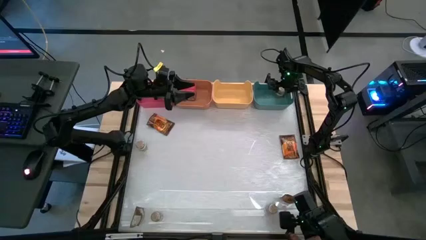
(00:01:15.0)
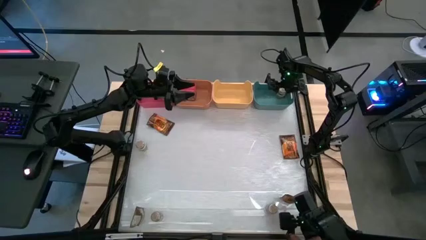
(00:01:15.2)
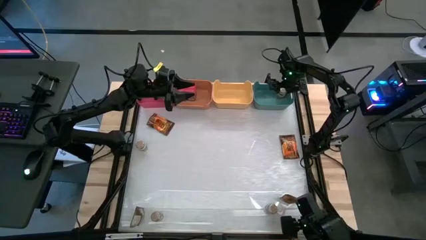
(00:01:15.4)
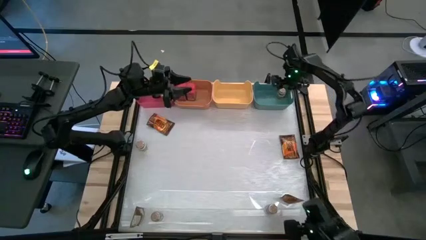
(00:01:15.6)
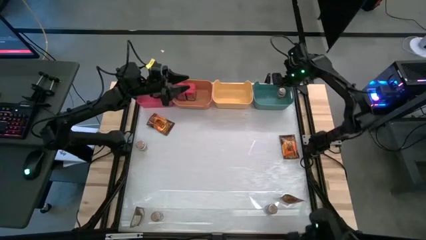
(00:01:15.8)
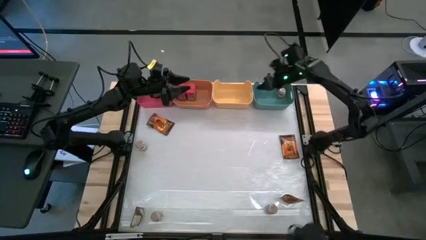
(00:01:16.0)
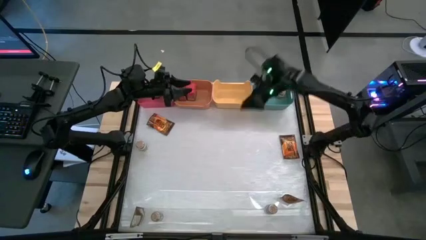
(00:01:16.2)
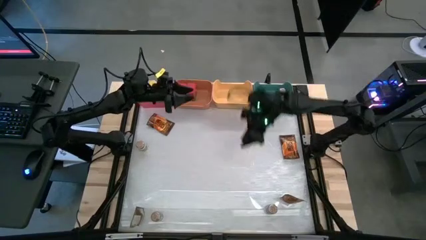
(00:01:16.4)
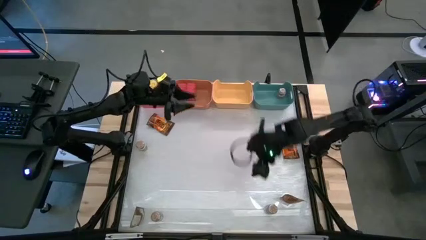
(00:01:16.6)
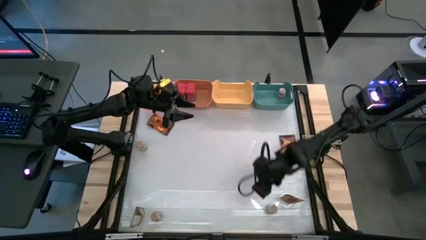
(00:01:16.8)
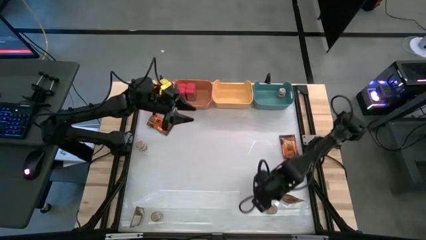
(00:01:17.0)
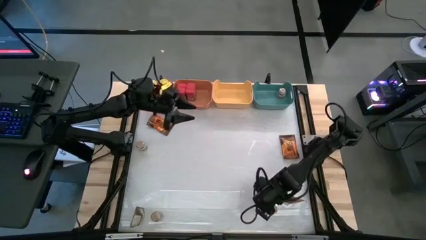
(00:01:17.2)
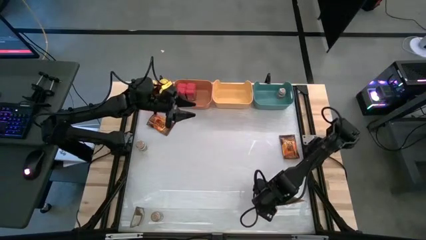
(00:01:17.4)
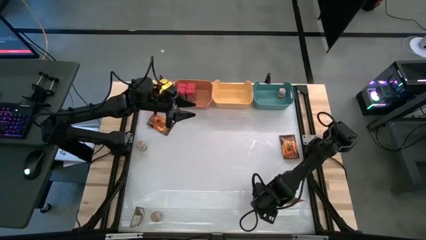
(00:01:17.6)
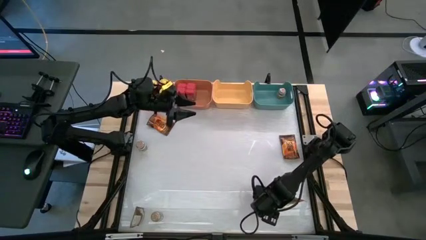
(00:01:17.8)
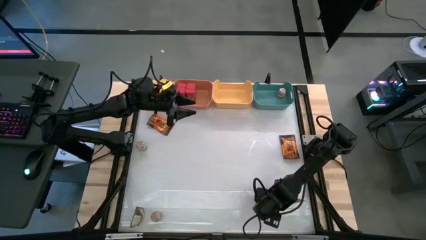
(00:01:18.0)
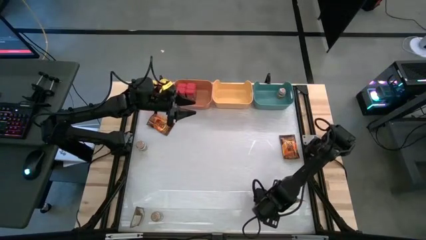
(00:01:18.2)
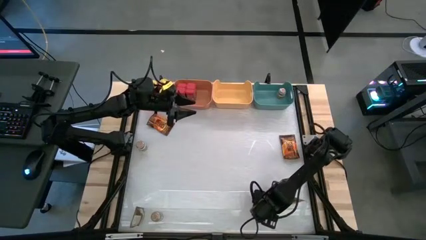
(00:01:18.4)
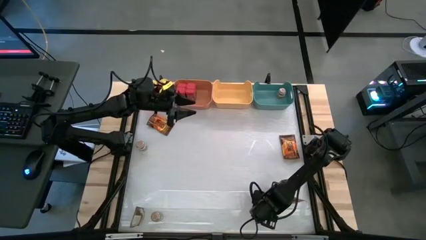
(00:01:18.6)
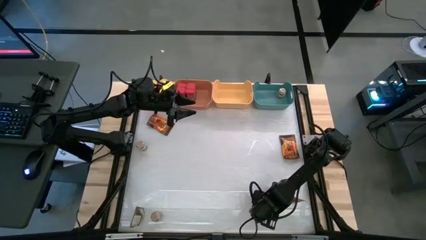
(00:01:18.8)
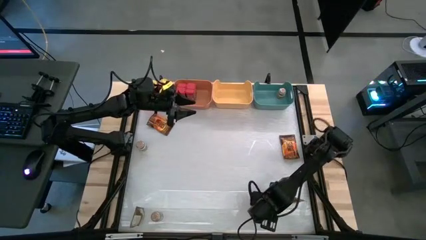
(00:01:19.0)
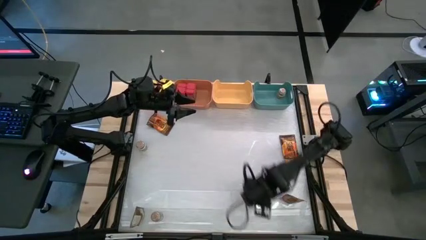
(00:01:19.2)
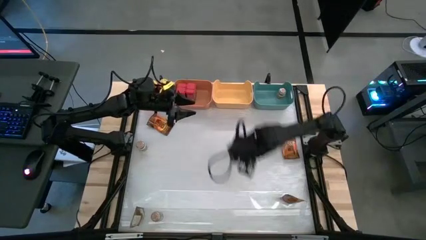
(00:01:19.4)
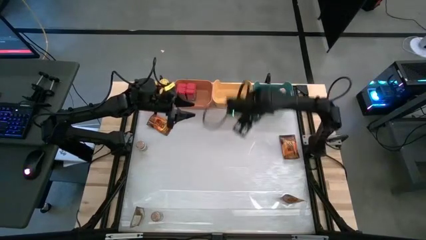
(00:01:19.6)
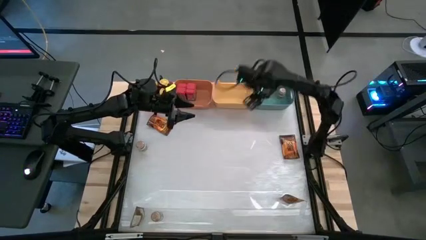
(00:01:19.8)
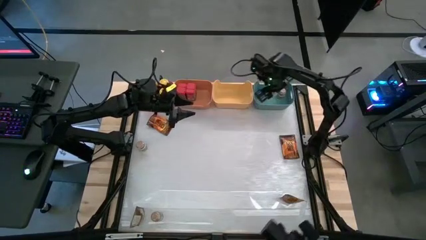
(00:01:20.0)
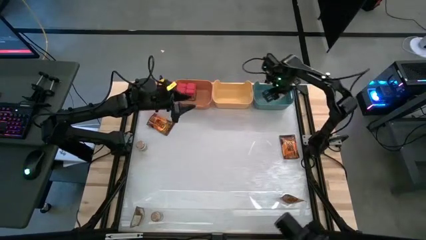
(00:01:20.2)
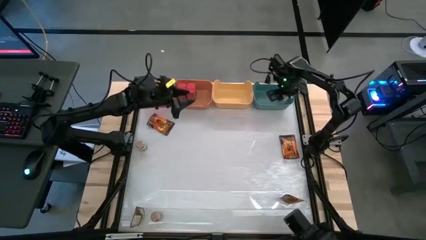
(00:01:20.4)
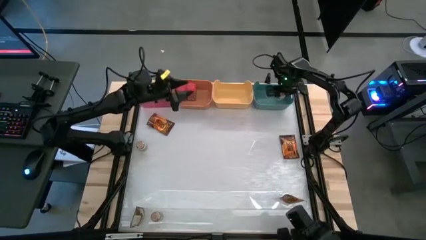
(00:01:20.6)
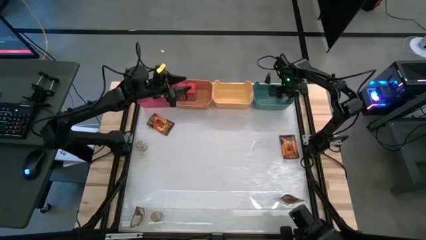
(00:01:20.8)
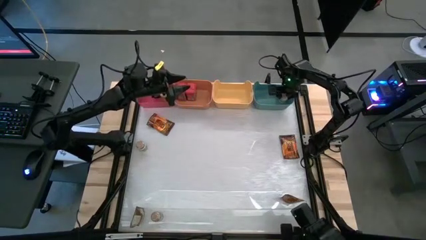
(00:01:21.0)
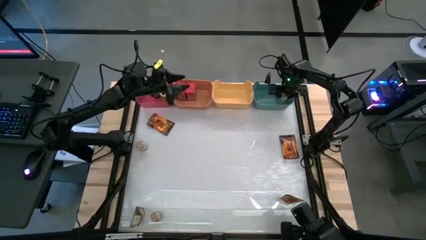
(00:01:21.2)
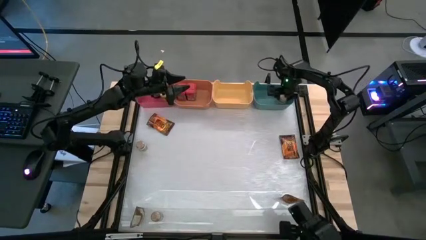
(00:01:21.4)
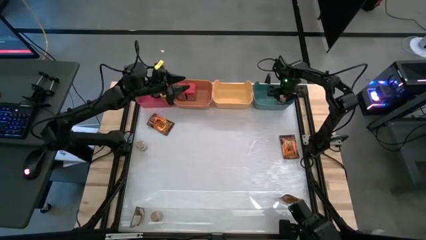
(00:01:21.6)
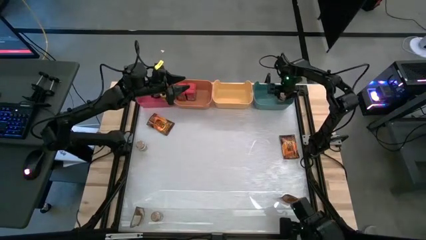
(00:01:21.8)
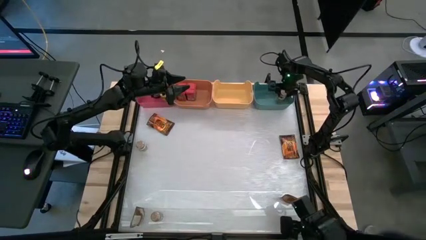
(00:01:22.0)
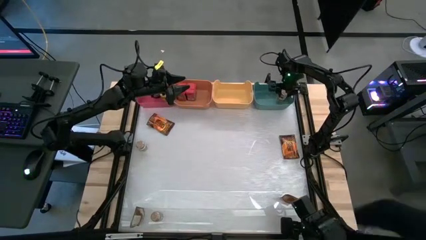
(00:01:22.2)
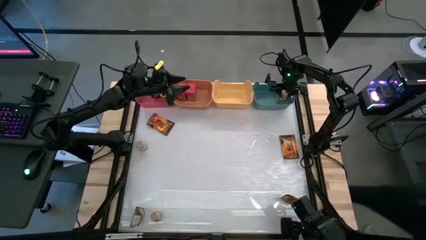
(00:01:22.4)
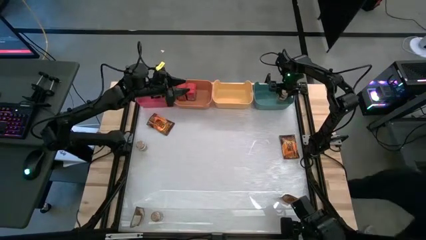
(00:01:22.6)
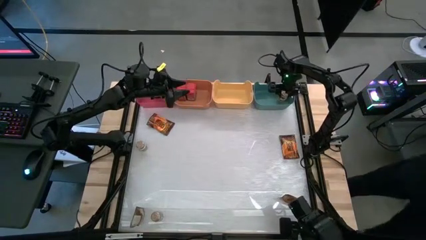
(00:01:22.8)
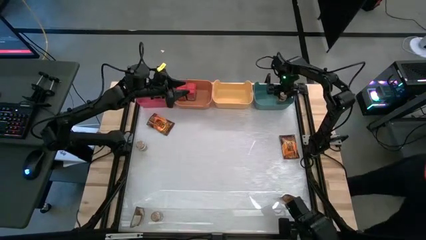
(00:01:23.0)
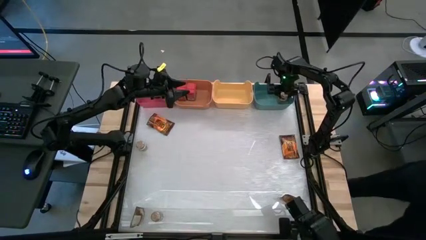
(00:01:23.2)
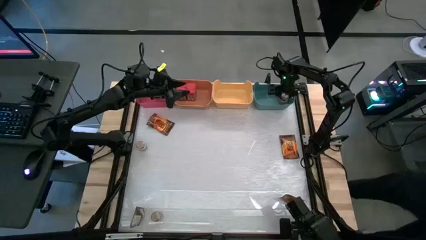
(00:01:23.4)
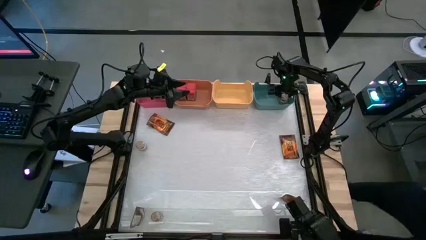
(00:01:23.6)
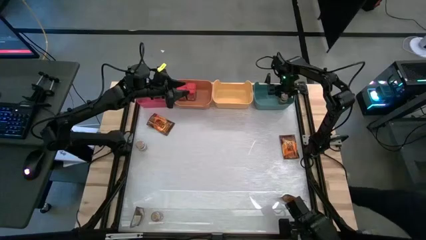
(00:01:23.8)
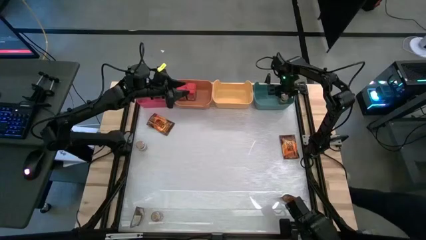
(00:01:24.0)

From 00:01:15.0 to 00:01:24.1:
Task: Sort spices by type
Put the bottom right brown seasoning bottle into the blue bin

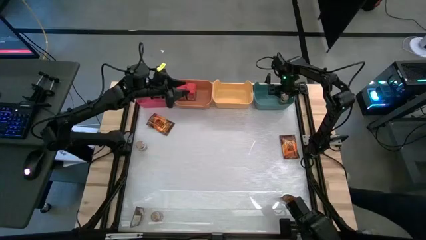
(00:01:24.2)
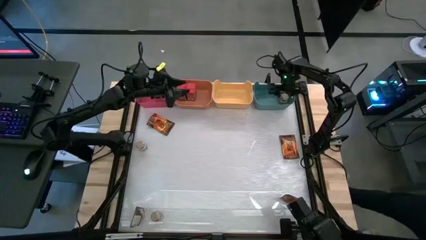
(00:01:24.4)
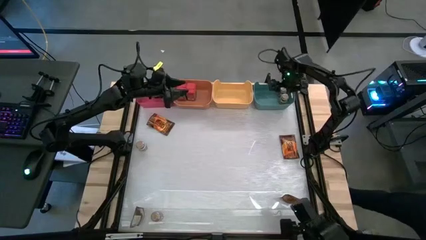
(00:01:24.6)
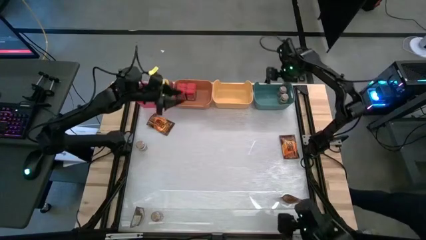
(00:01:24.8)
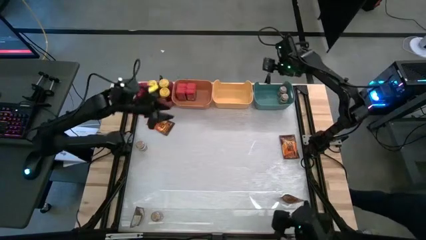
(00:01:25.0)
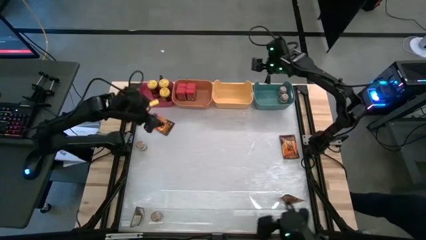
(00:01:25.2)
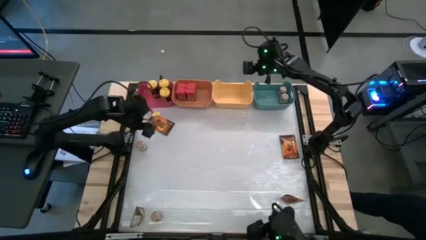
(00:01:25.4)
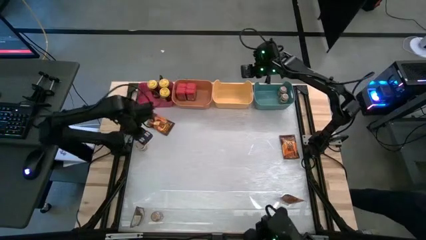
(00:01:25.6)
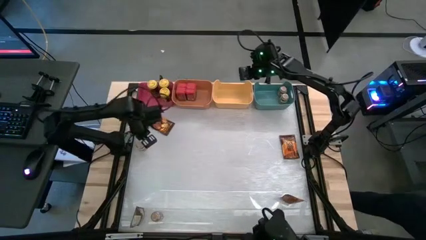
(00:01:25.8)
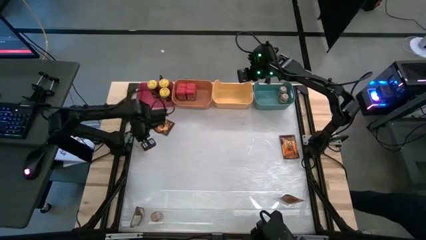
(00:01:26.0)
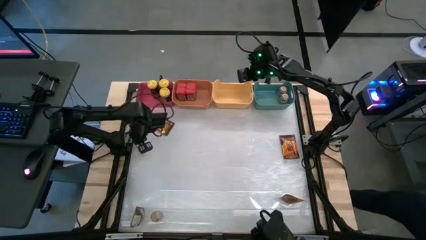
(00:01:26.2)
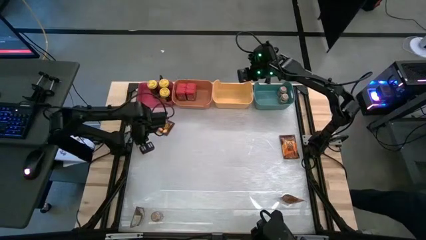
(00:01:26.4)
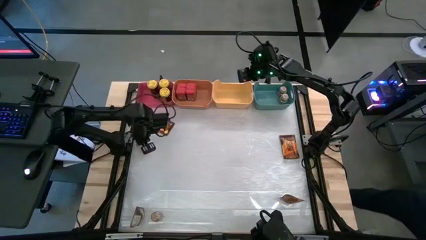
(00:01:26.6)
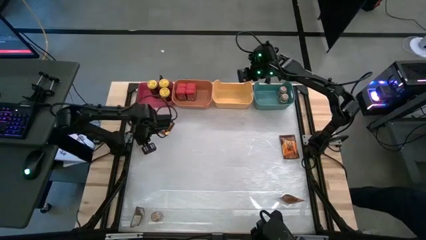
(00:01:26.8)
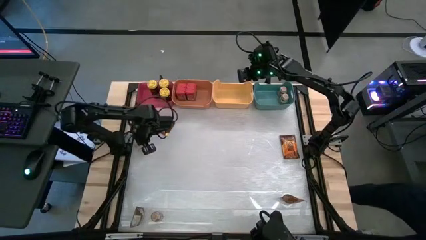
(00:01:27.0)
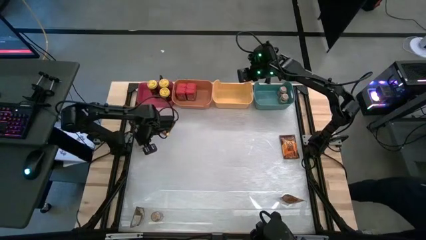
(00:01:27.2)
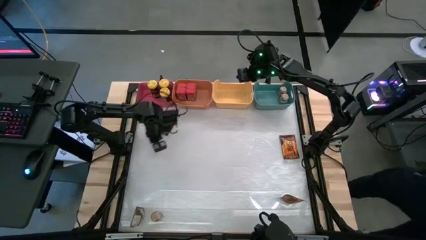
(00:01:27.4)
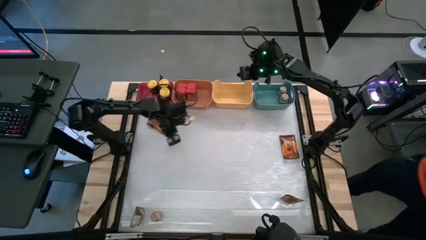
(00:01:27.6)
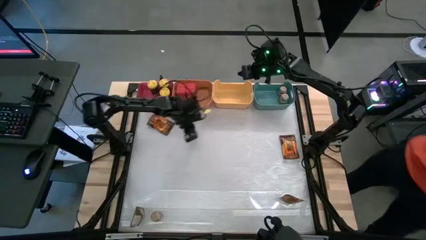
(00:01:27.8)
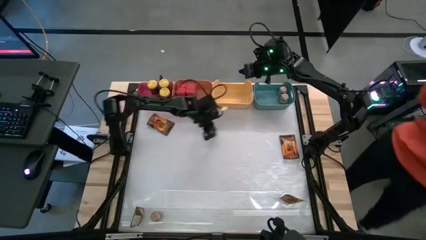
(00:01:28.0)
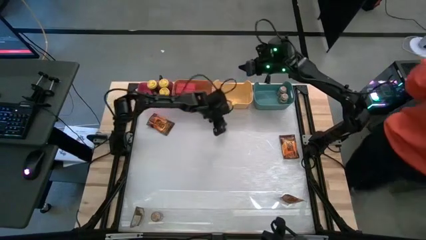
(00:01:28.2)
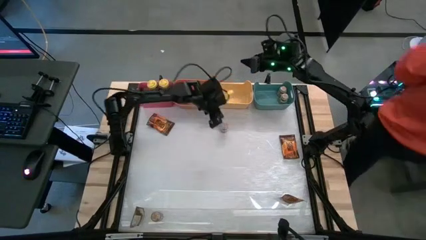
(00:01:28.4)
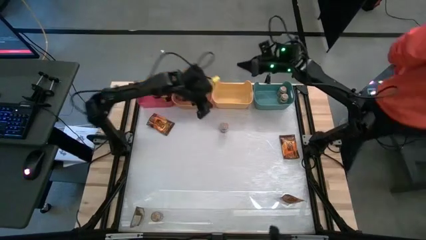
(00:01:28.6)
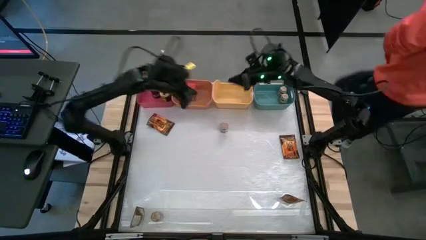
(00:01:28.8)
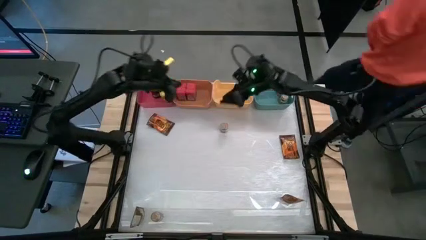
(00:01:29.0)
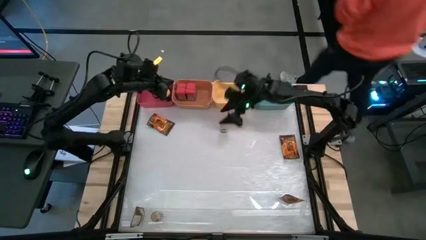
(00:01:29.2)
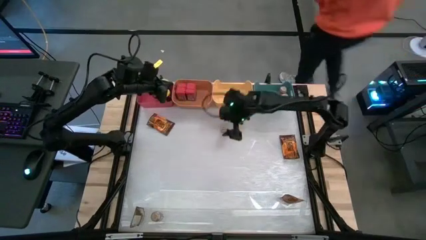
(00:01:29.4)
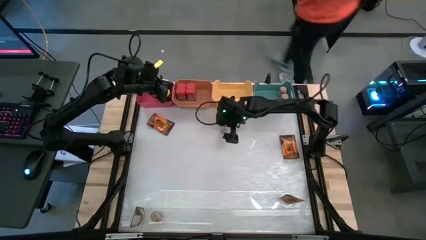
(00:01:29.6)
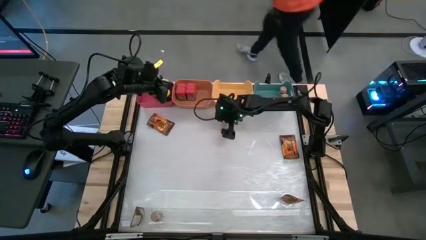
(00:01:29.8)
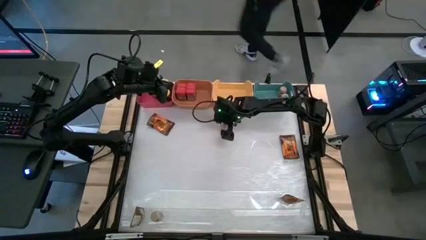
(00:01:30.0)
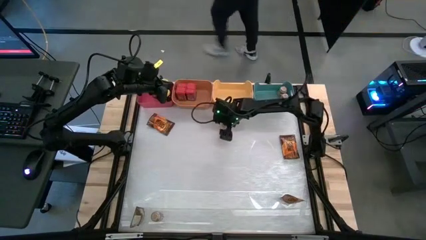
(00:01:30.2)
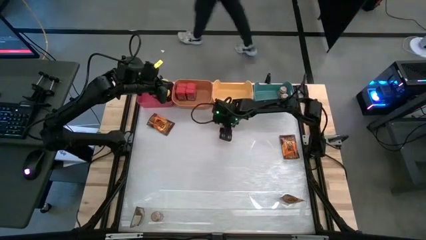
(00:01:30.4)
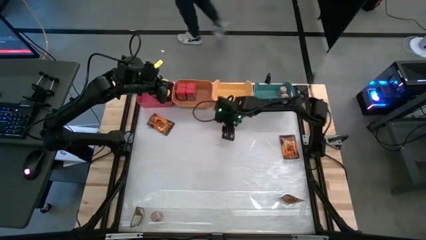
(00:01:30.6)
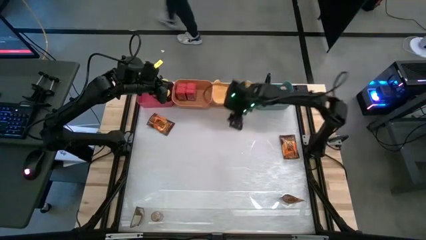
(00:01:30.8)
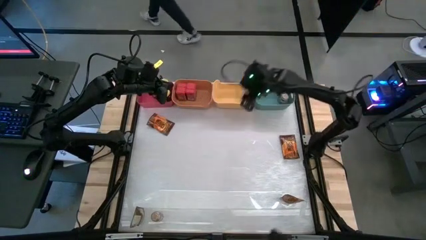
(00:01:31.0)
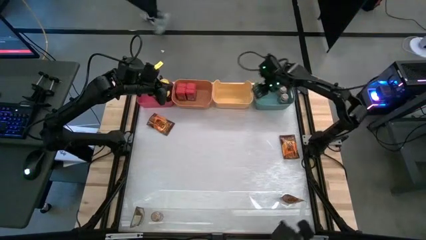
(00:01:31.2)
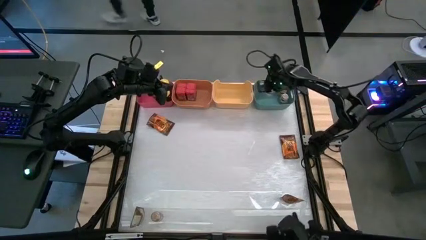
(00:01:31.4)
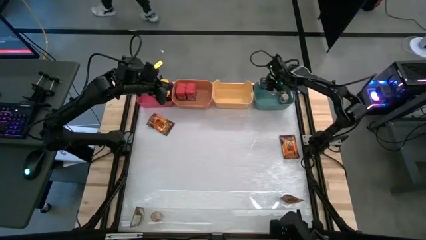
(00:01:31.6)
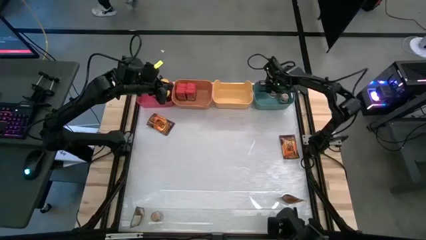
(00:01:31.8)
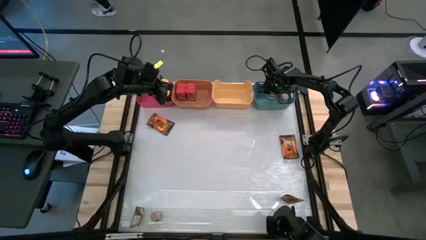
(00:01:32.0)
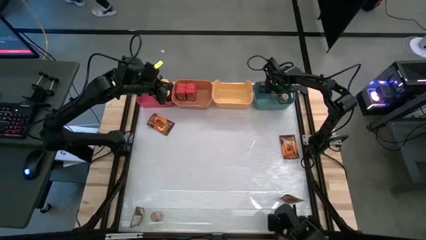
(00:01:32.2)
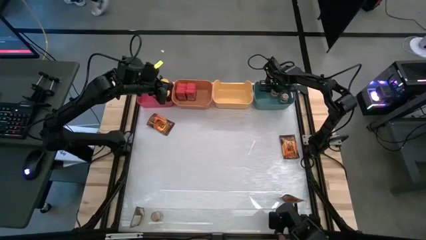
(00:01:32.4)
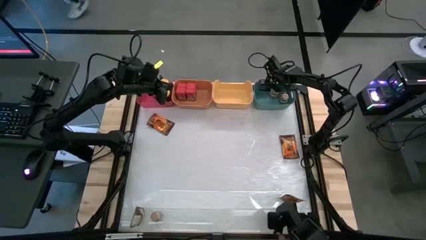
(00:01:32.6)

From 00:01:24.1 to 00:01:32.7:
Put the top left brown seasoning bottle into the blue bin
